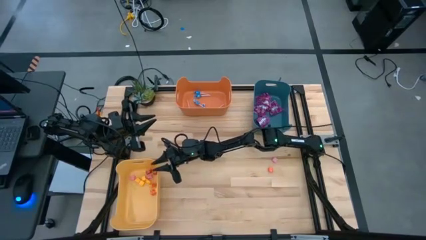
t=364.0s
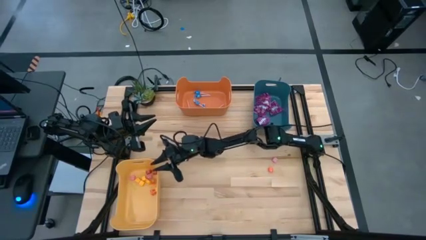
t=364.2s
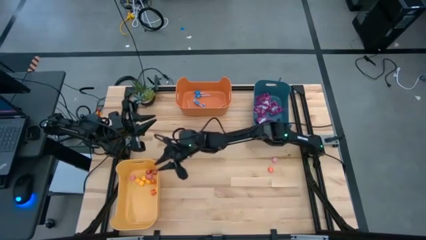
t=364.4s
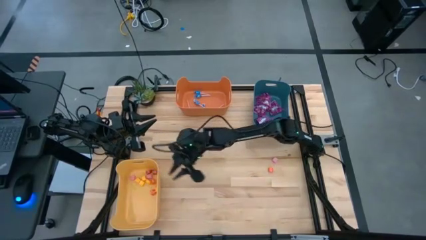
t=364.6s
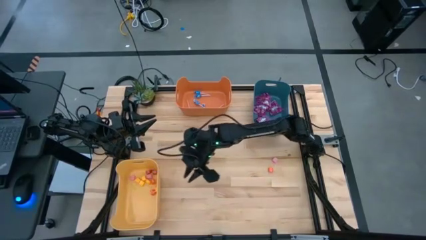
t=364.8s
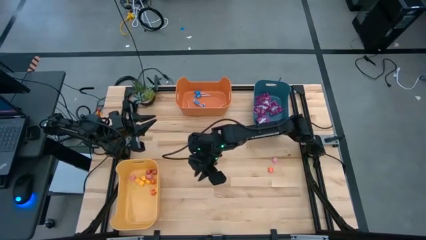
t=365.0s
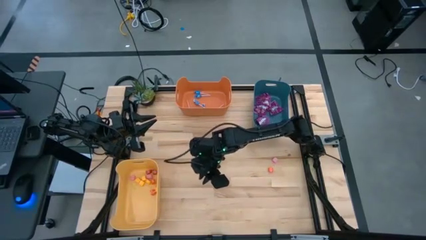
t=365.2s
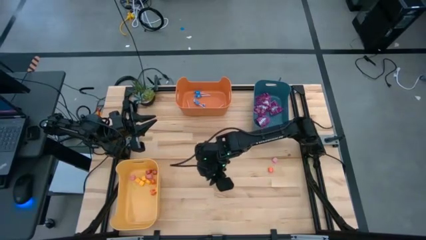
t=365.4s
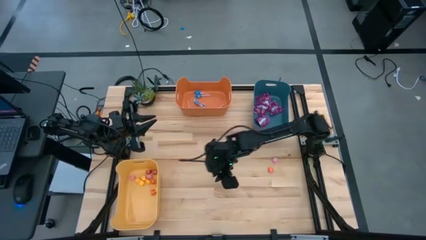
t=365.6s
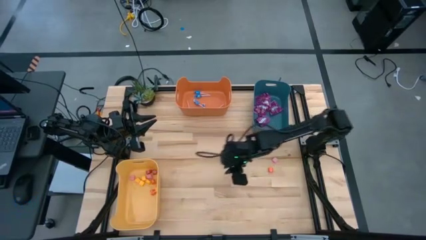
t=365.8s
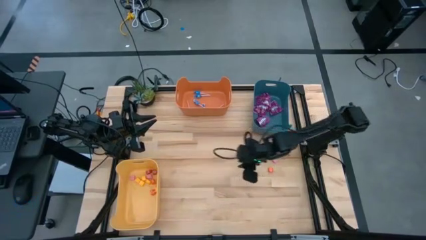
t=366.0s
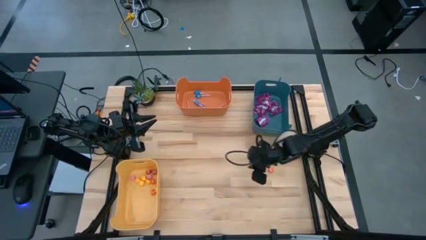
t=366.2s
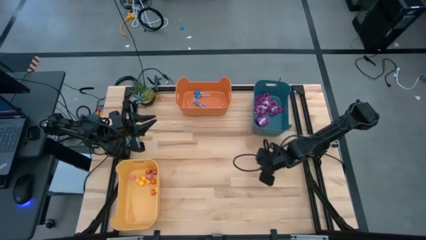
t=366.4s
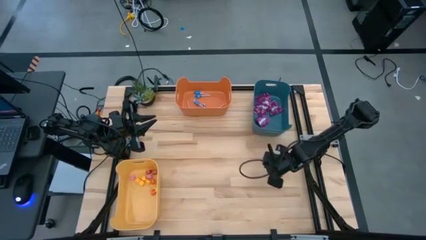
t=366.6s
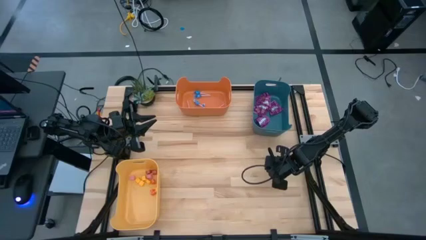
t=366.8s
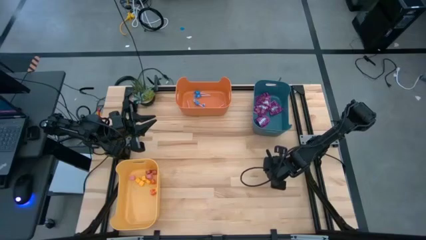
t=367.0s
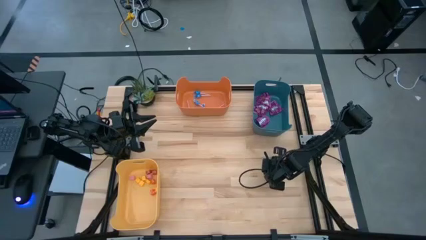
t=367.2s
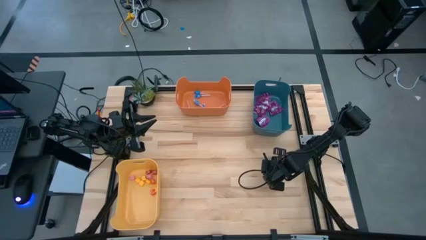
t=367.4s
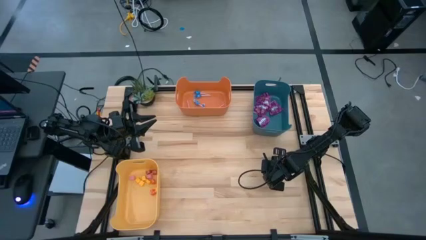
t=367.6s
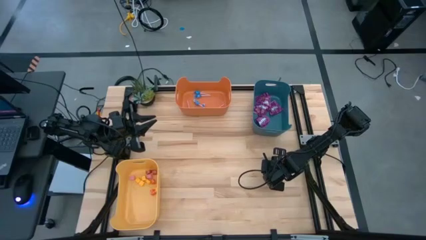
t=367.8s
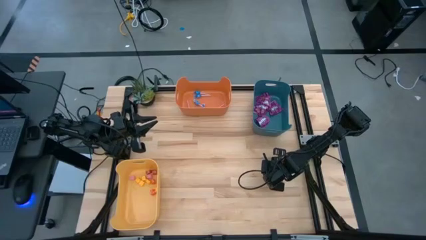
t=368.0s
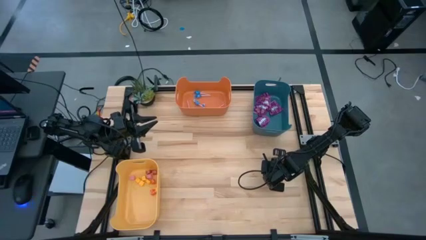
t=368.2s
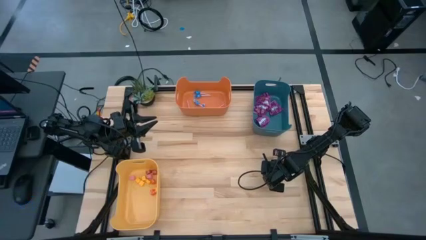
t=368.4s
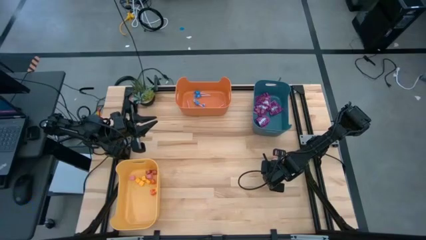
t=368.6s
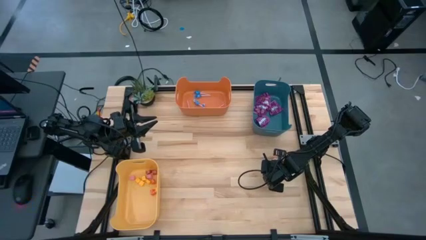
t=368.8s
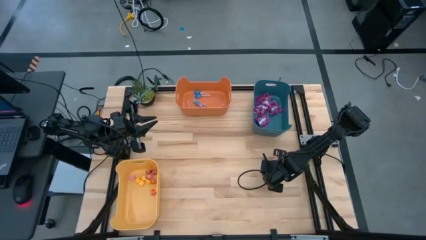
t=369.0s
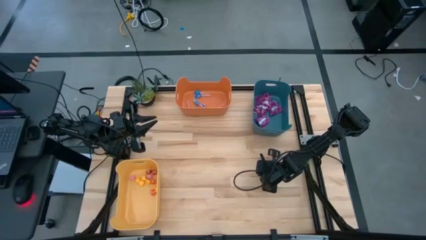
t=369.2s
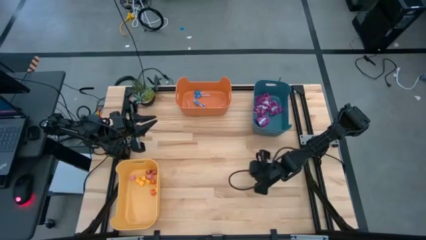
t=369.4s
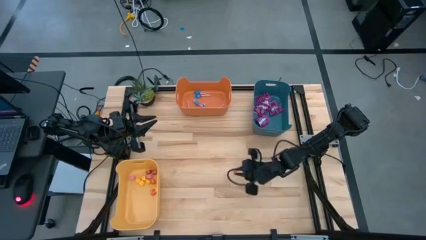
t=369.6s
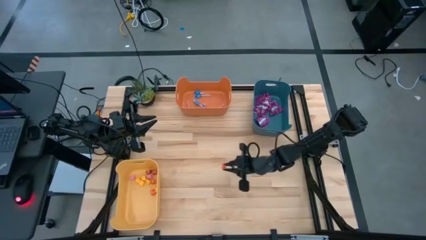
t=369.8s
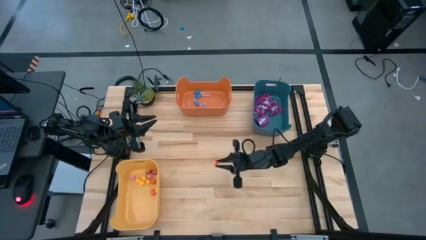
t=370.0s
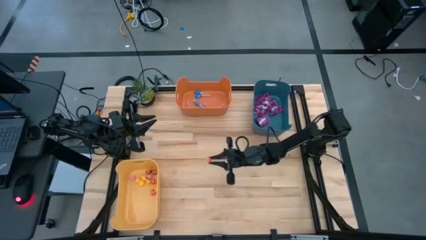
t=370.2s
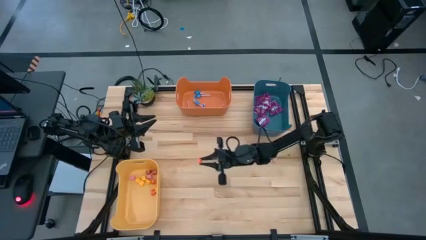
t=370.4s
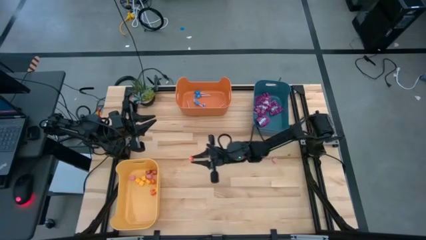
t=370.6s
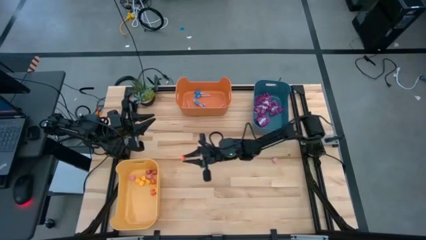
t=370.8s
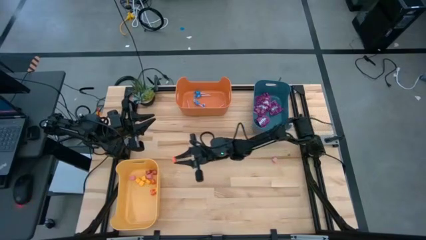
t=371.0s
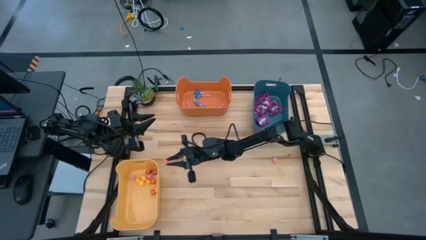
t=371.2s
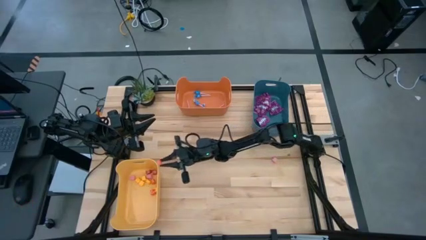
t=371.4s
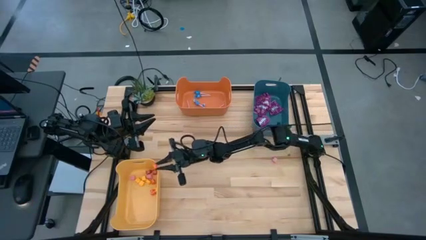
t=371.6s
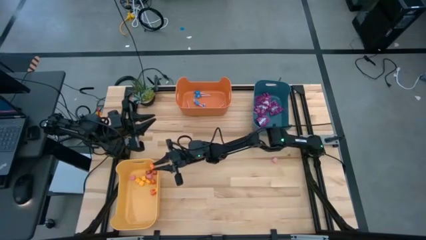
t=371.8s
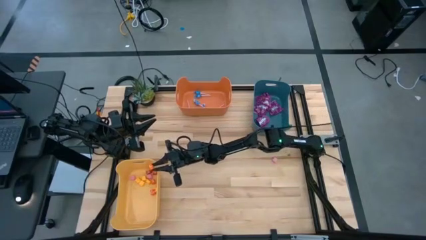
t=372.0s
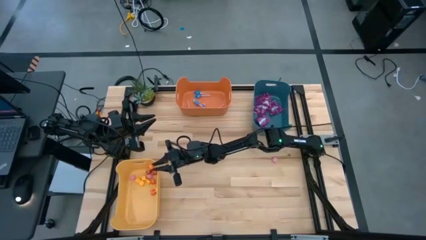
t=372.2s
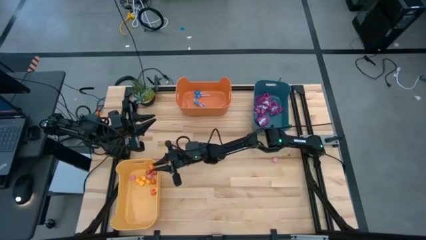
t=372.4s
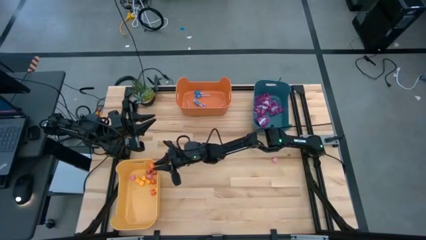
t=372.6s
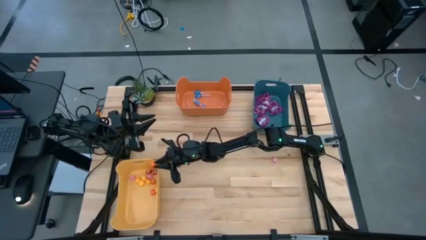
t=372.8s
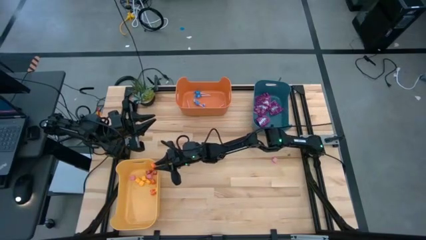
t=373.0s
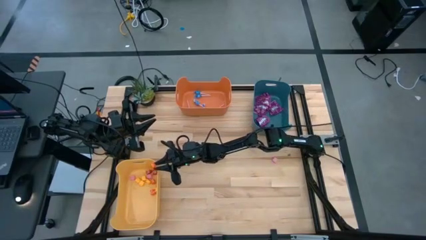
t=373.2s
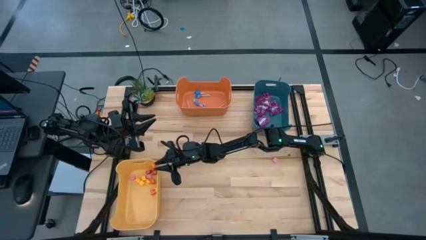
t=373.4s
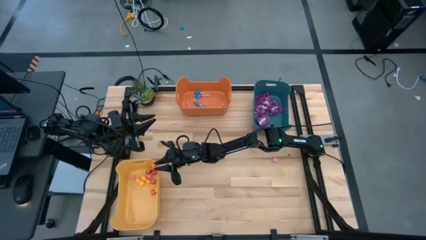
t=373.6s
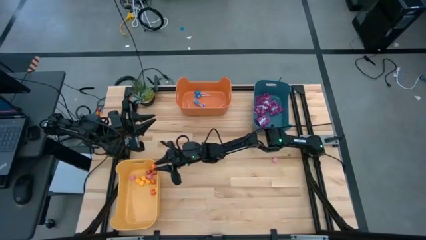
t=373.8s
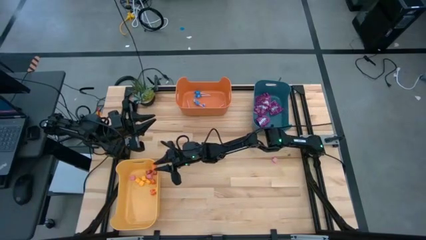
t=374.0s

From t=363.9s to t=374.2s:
Task: Sort candy
Put the orange candy into the yellow bin

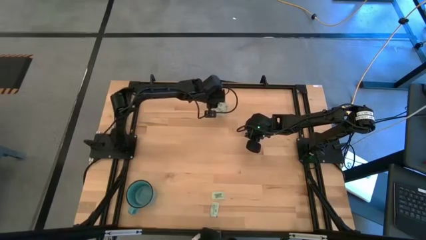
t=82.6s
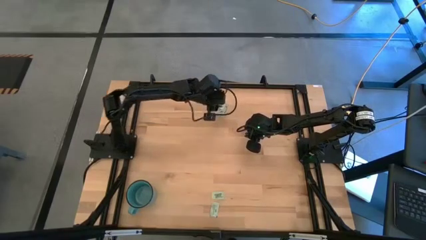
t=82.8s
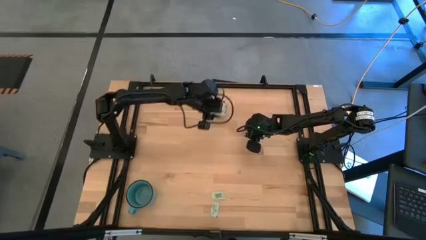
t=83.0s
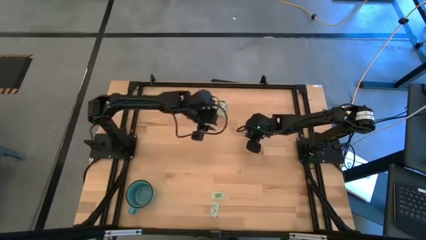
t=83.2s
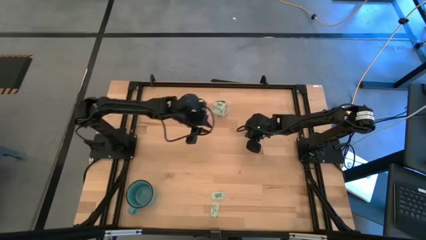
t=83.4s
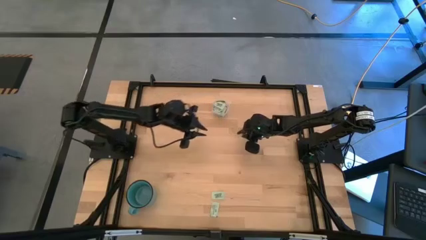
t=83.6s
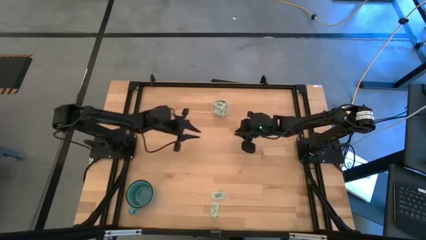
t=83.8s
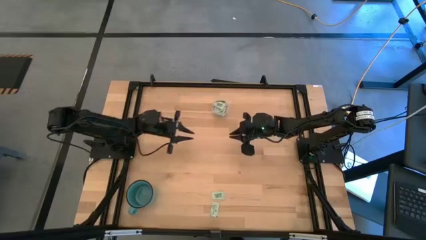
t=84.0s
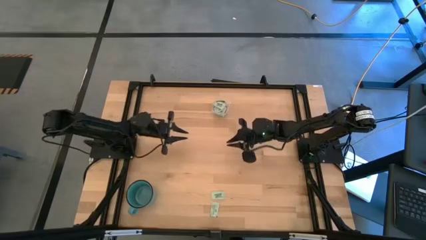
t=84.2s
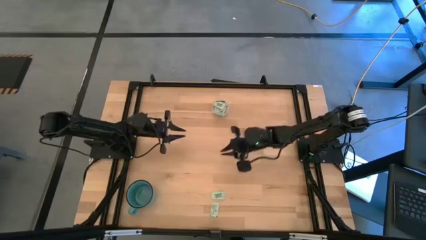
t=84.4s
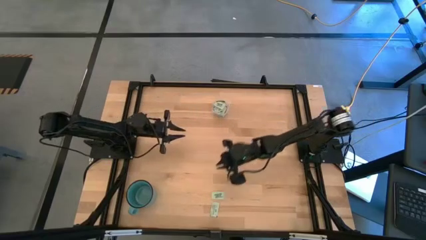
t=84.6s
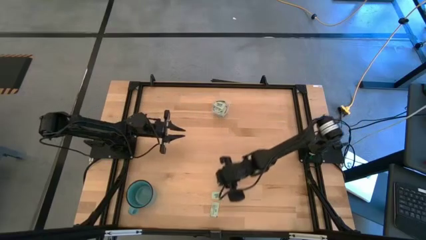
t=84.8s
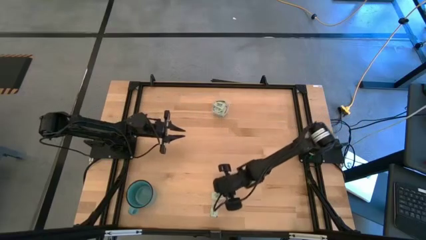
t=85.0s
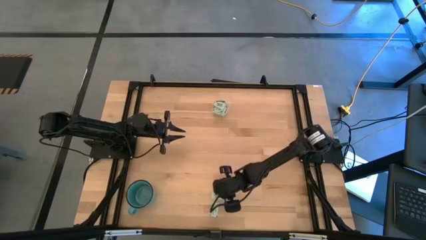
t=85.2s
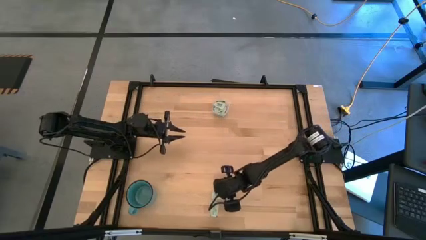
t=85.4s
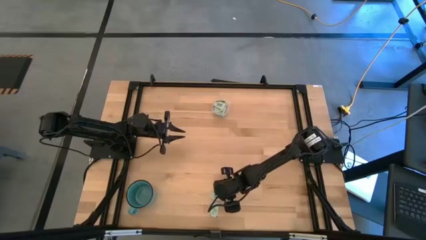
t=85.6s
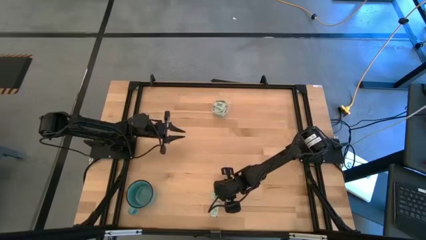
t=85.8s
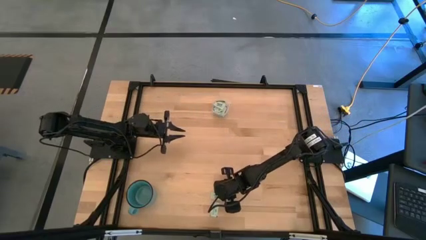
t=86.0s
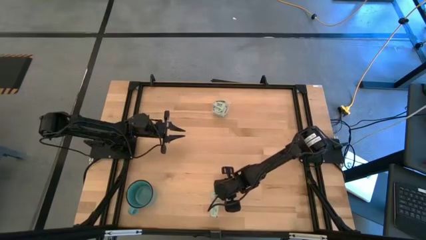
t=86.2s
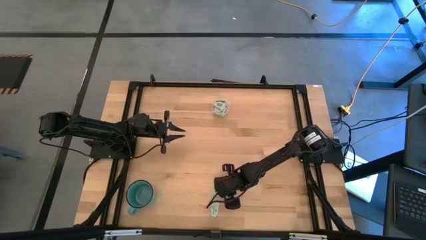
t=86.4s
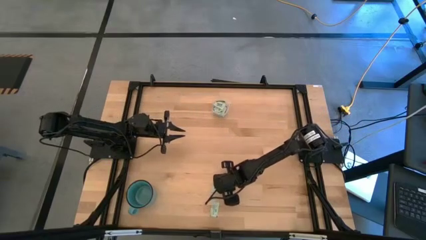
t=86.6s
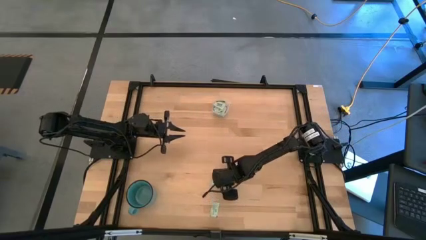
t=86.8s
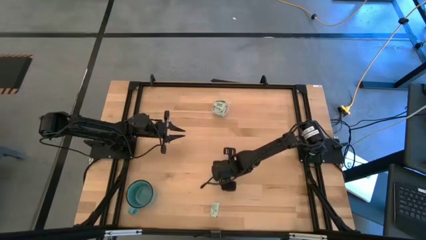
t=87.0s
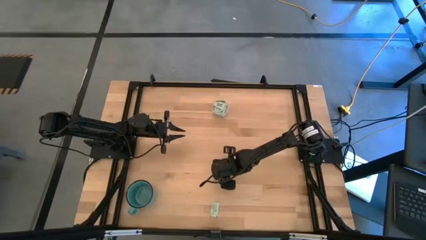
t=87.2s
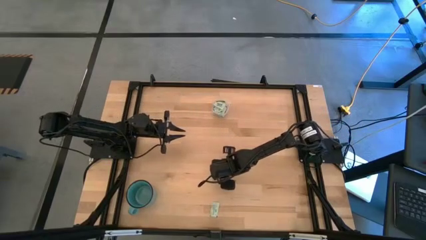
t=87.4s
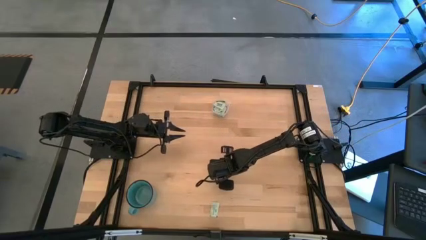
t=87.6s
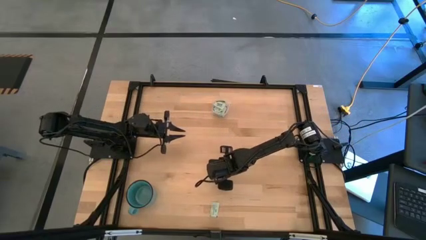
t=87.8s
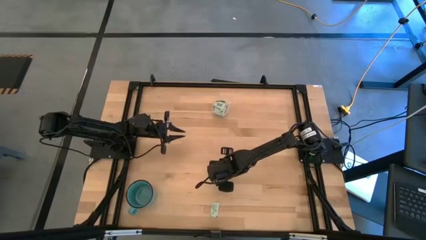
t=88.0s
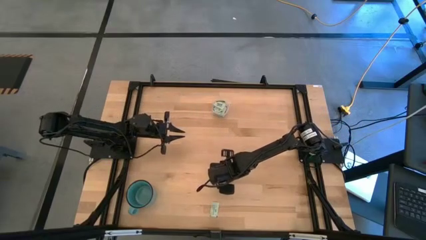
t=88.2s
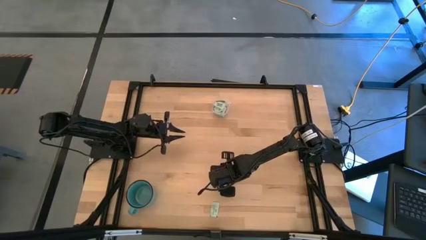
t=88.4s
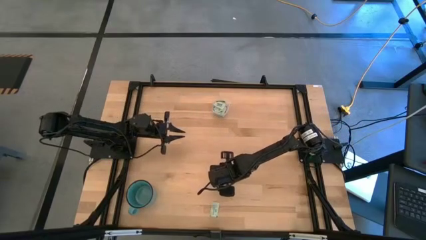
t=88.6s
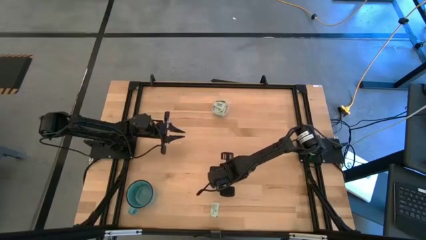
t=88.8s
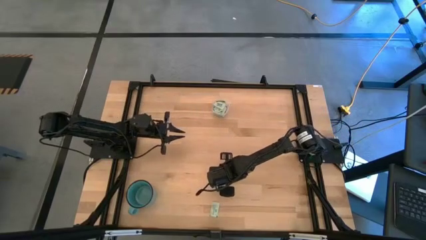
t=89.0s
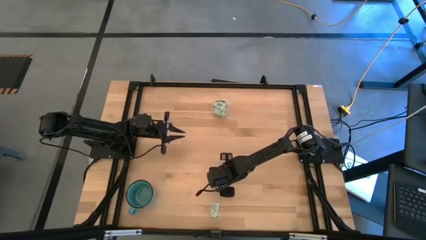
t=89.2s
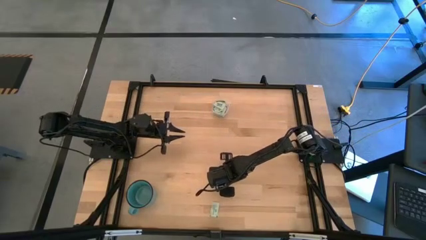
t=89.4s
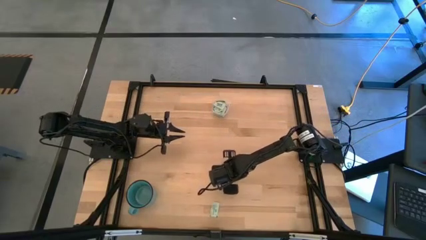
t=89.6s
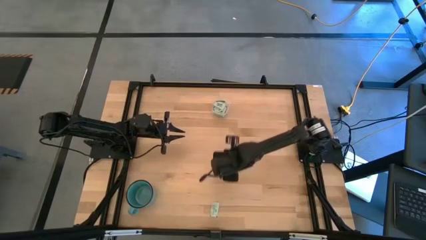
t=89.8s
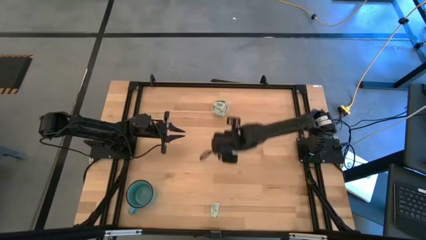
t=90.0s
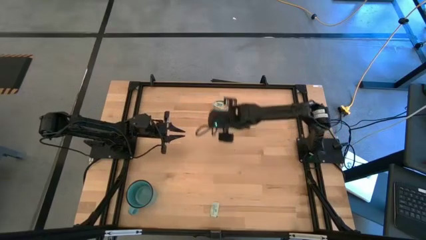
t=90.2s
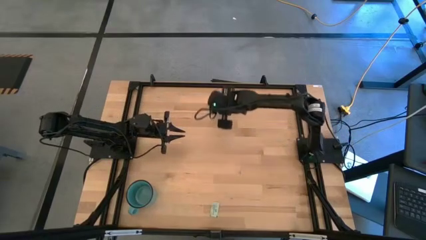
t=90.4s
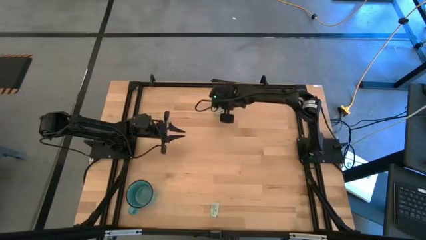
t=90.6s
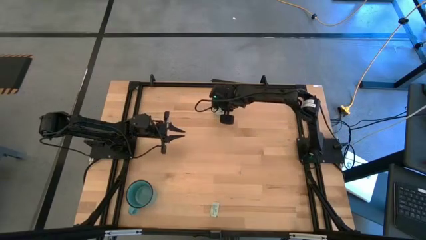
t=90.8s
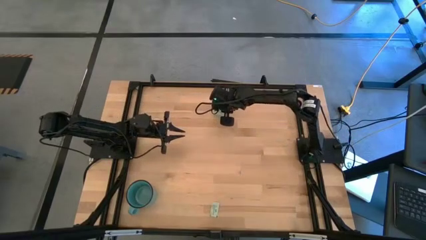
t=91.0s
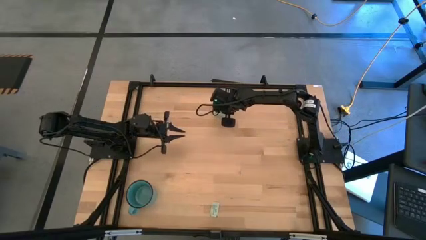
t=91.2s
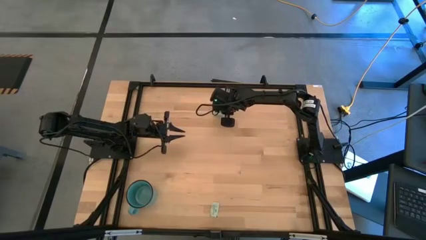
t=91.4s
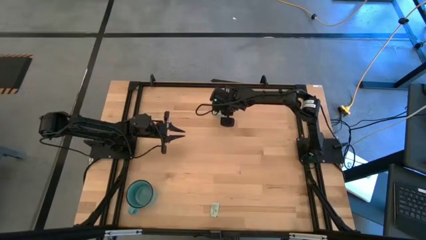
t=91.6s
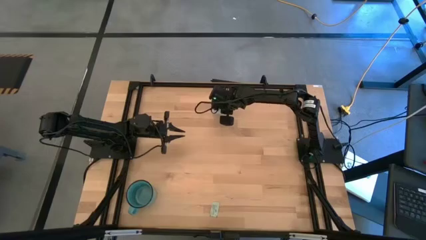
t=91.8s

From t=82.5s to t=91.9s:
Task: Pick and place items into bin
Put the light green stevia packet into the transparent bin
